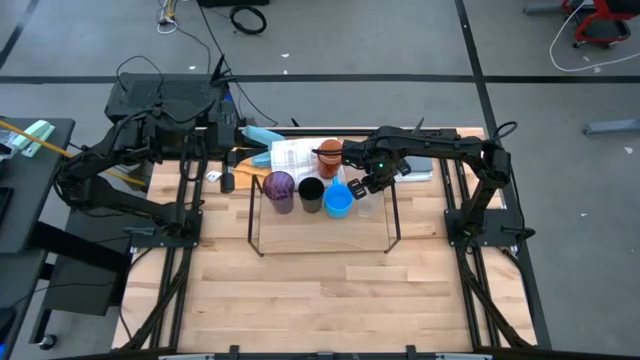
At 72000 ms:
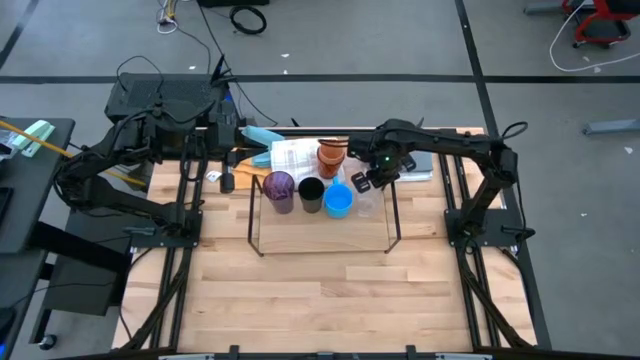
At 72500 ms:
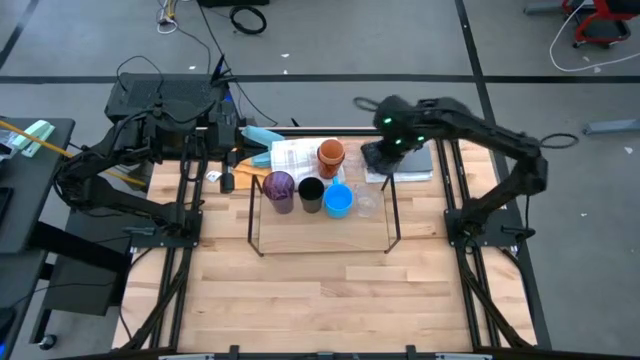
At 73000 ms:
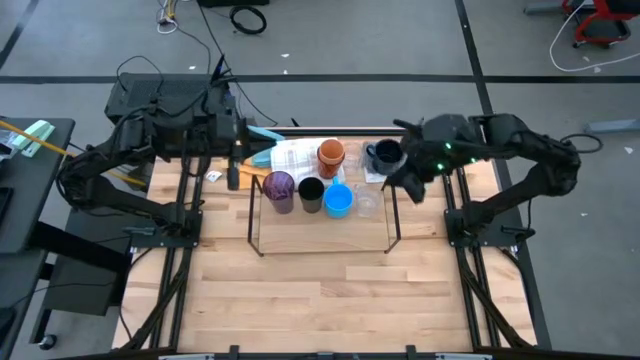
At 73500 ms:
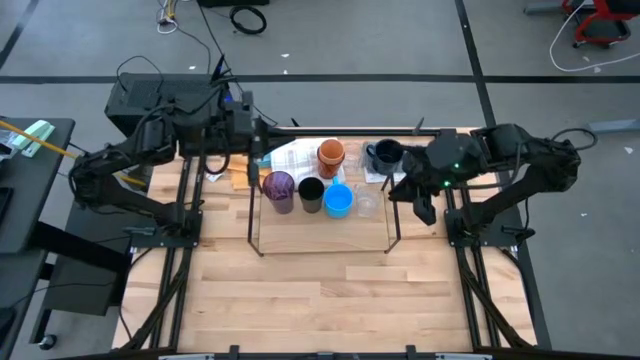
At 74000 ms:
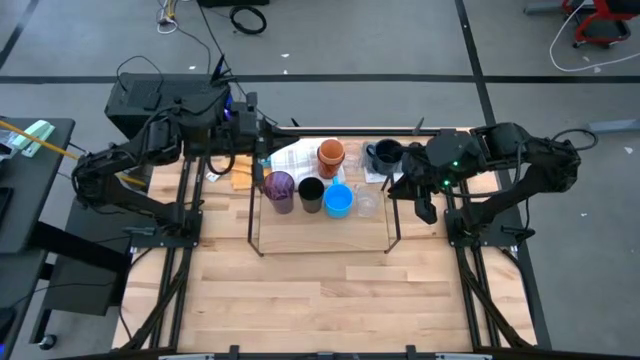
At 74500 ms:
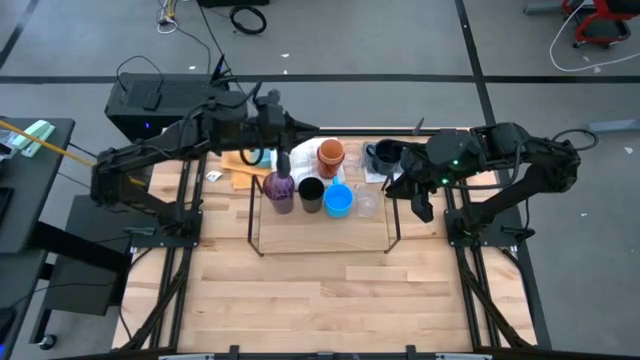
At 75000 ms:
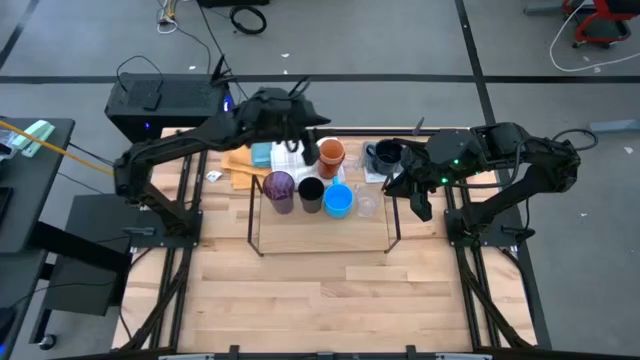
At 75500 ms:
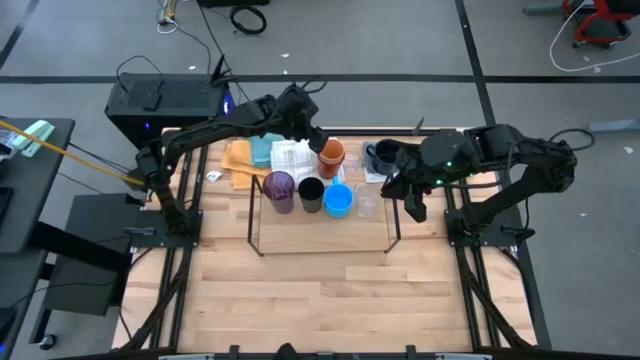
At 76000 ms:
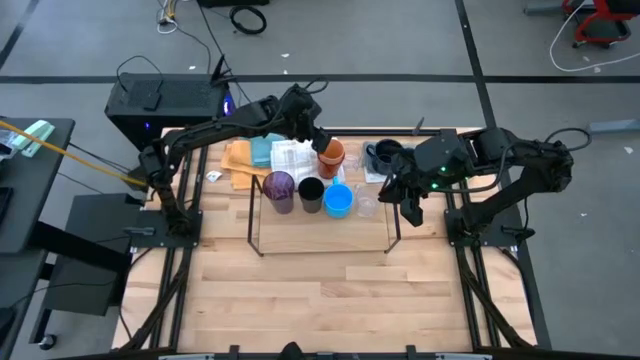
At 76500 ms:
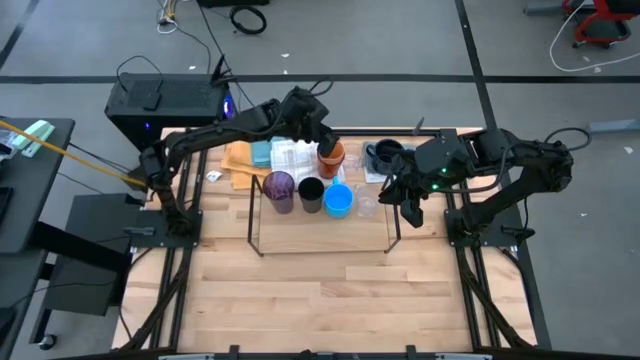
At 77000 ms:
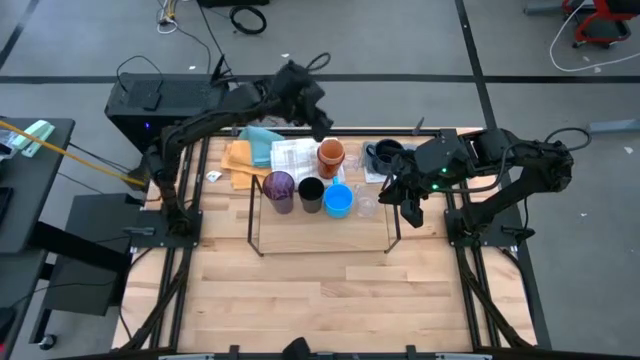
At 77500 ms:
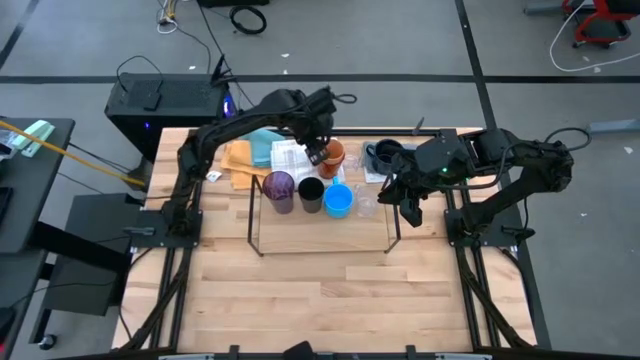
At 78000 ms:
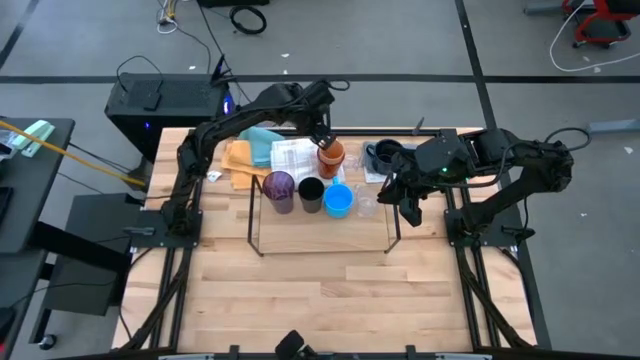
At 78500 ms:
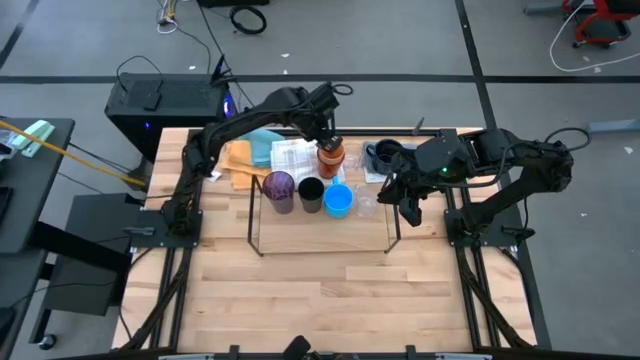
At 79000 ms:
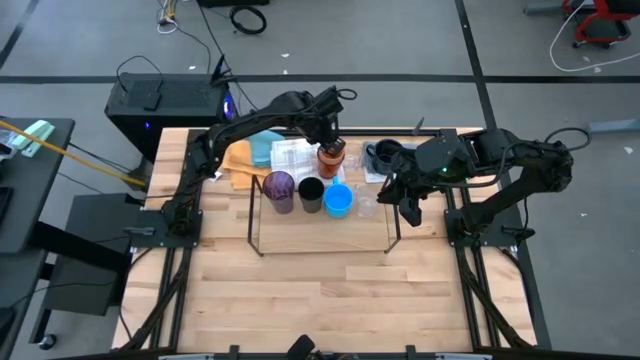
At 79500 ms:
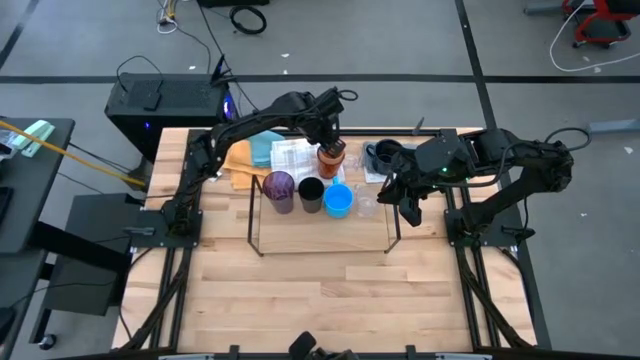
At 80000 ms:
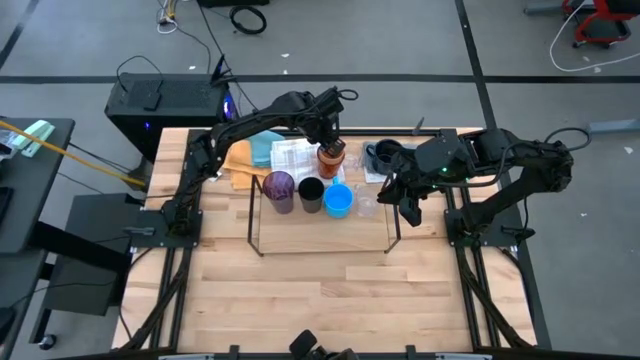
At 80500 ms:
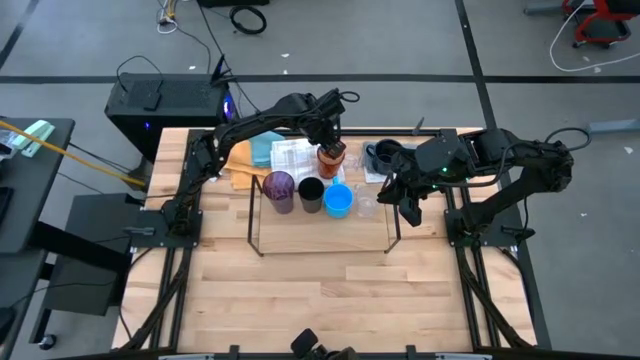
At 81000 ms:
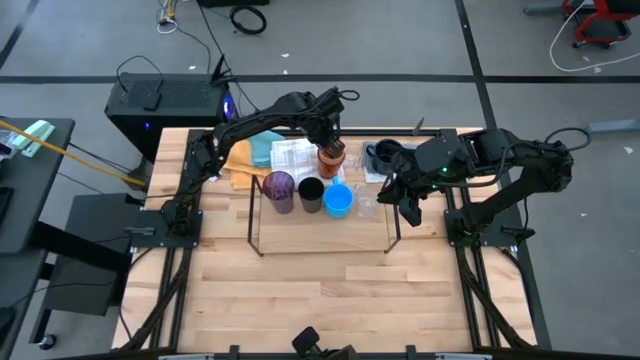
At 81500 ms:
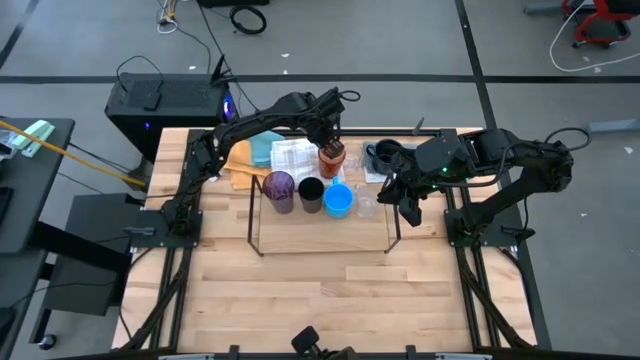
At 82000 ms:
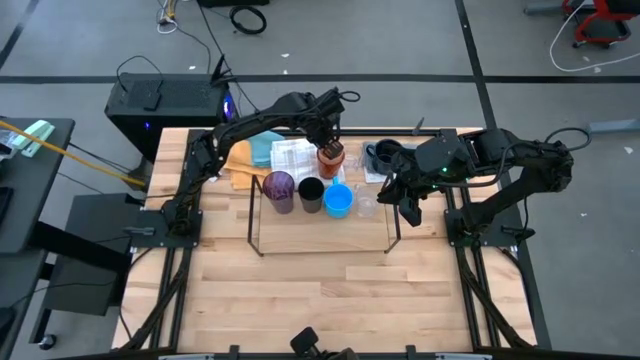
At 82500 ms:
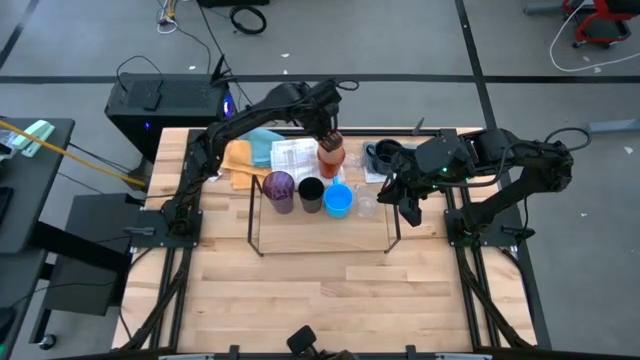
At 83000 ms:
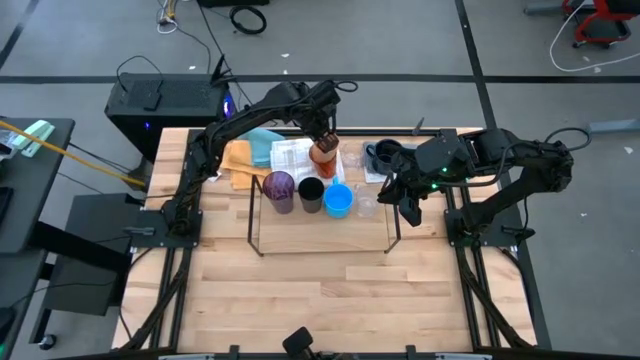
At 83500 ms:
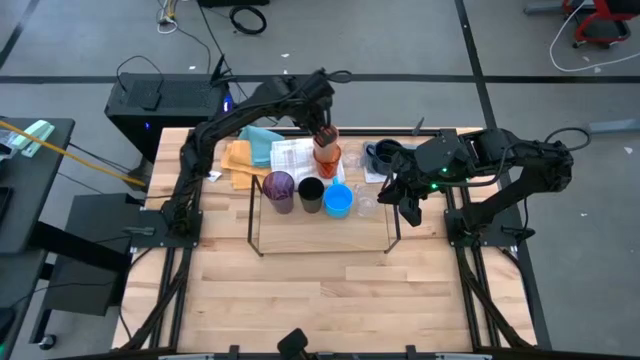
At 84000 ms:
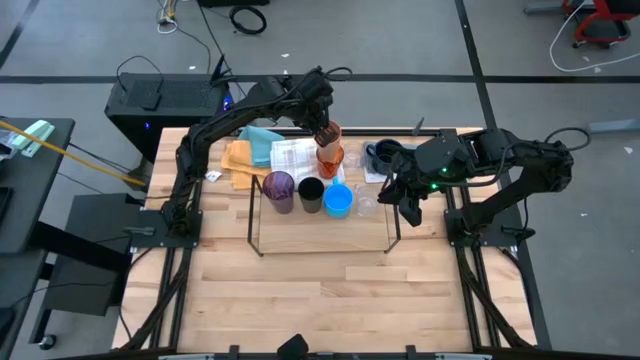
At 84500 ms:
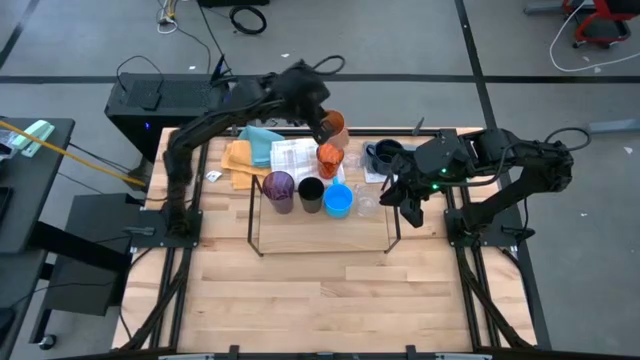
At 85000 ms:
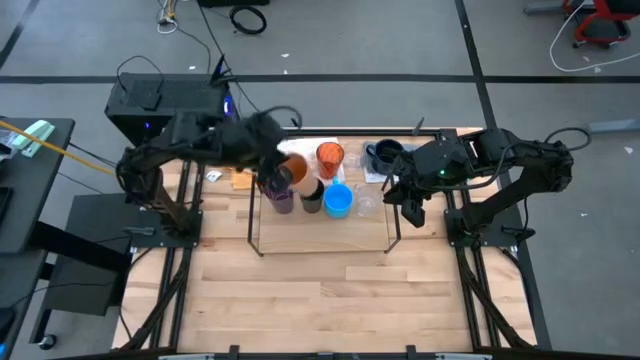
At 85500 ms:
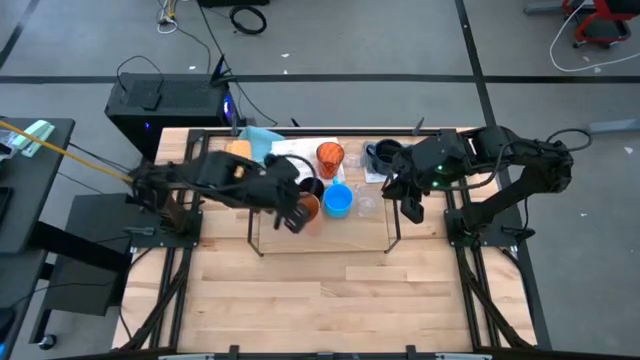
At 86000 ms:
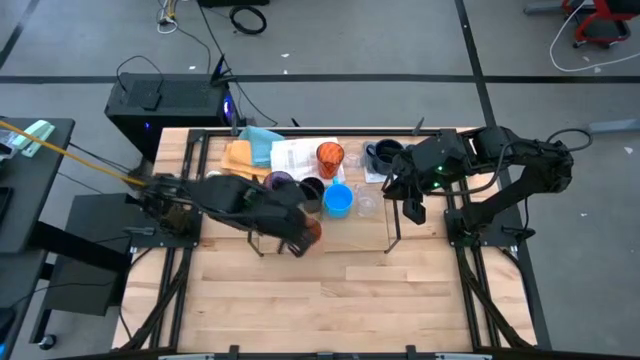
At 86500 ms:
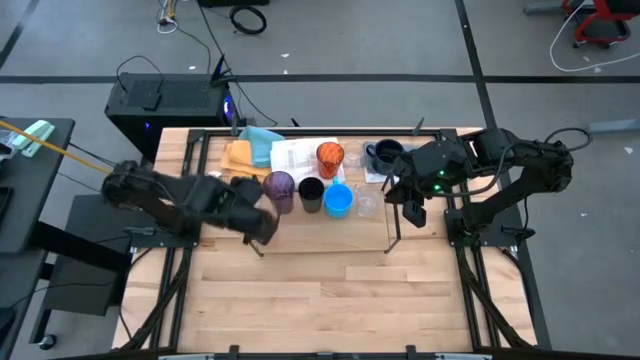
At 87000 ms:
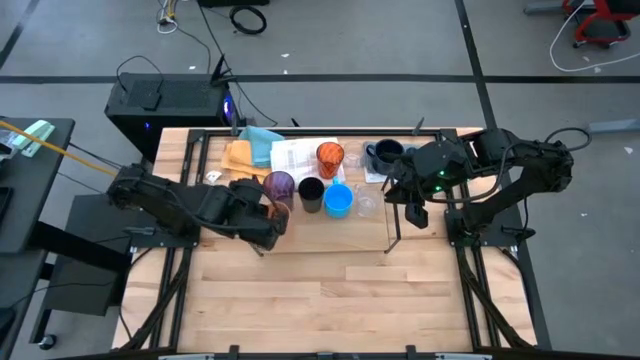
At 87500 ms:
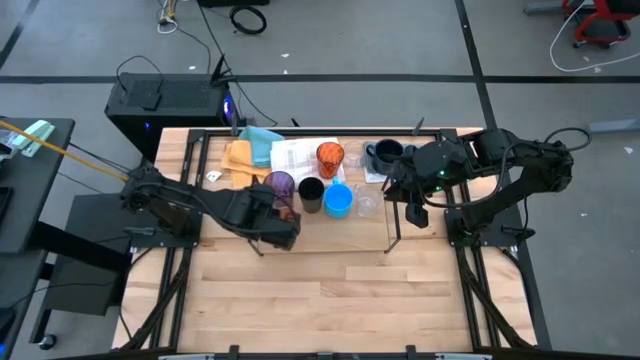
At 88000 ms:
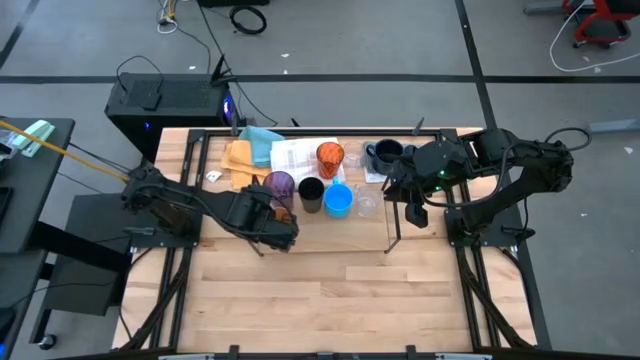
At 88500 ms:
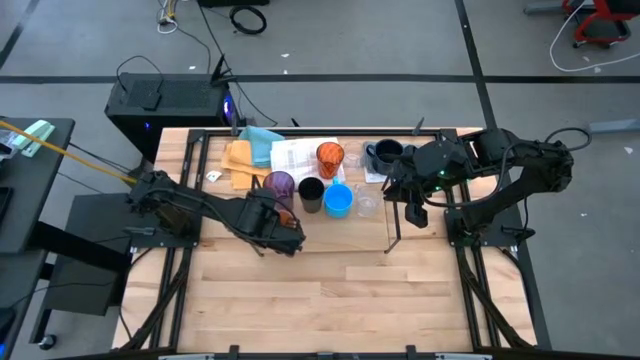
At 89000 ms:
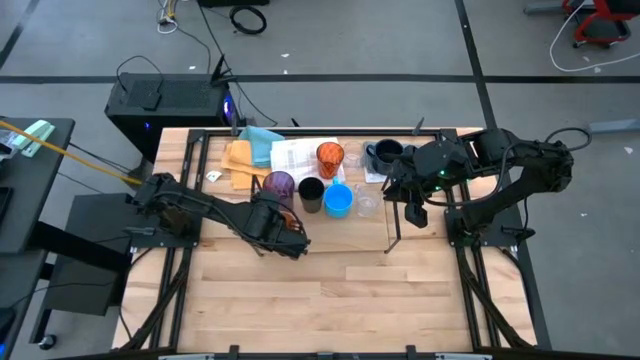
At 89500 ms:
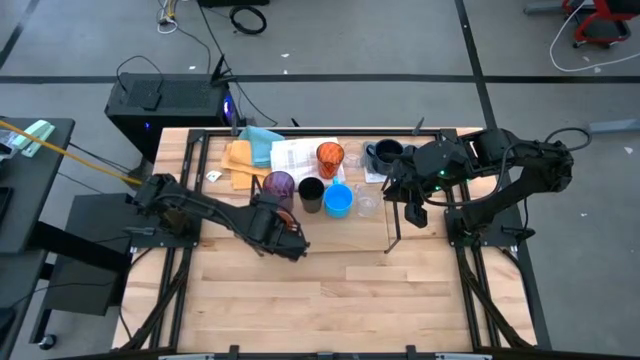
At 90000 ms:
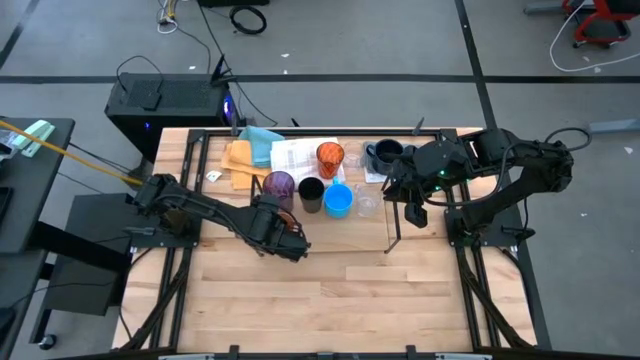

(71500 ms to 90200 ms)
Task: Stack small to large cups/mugs on shelf
Put the orange cup on the shelf

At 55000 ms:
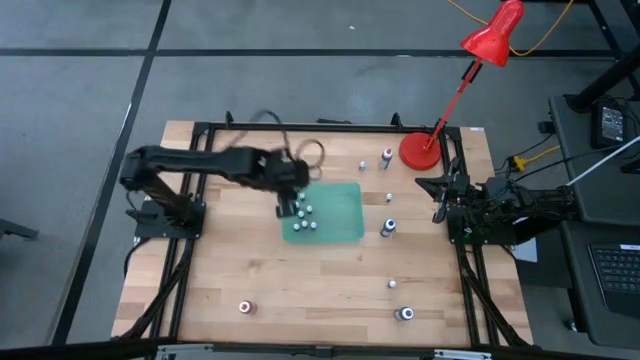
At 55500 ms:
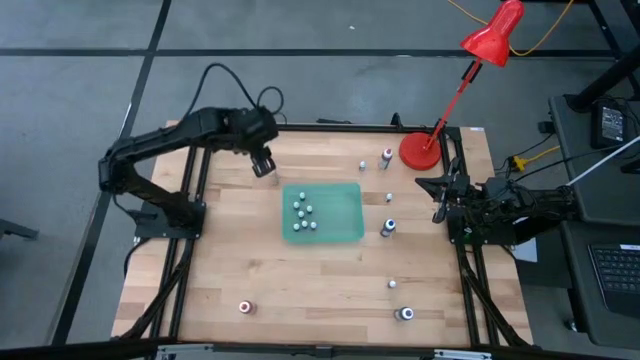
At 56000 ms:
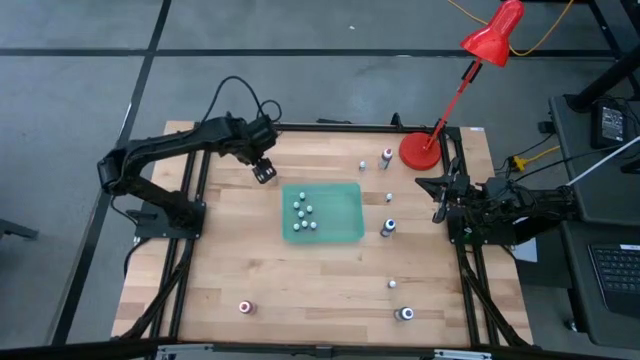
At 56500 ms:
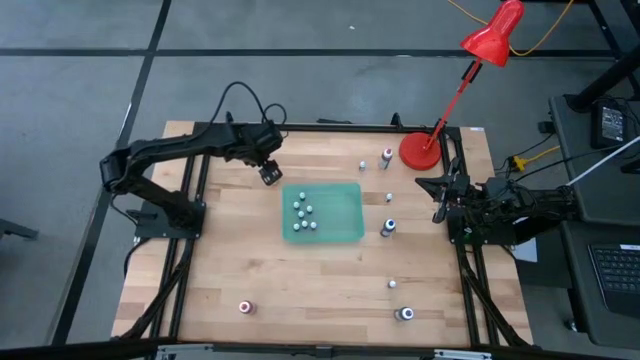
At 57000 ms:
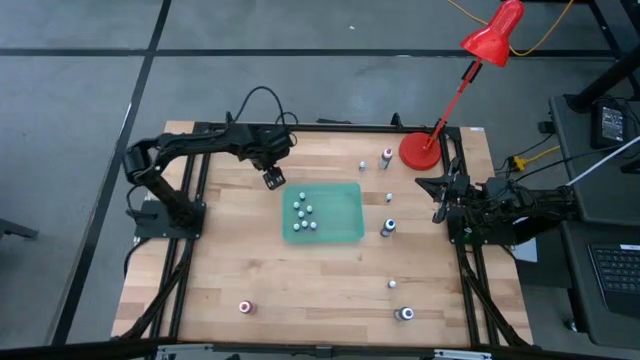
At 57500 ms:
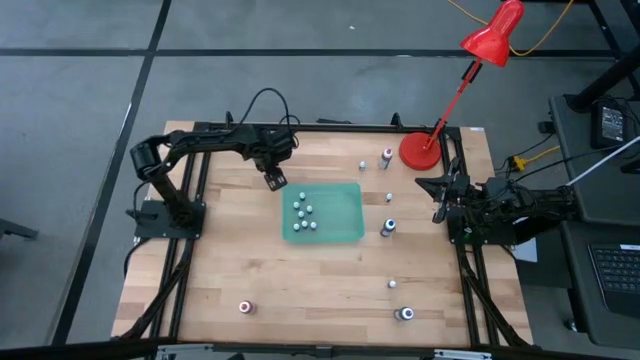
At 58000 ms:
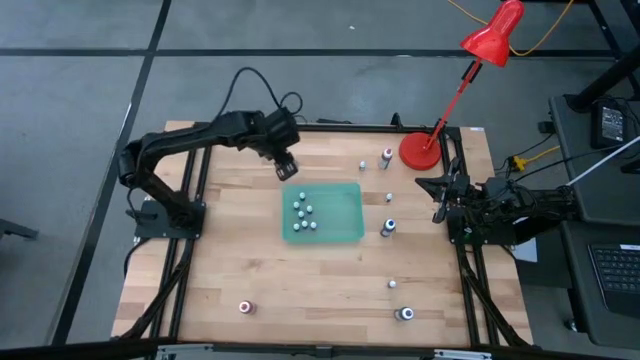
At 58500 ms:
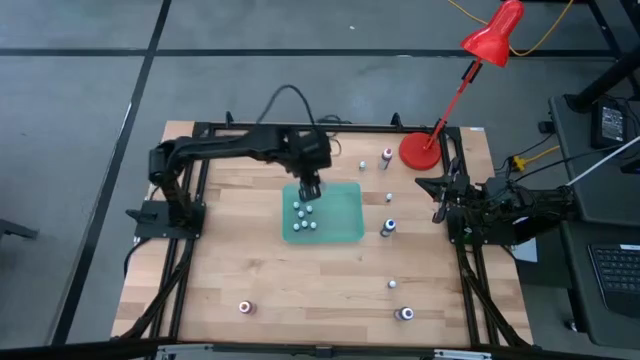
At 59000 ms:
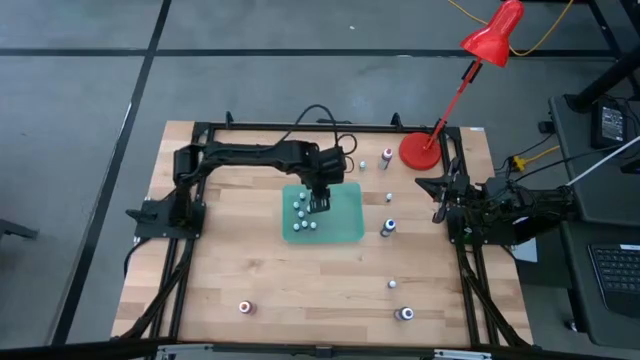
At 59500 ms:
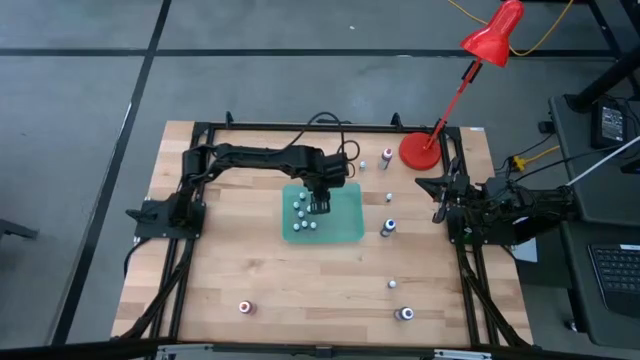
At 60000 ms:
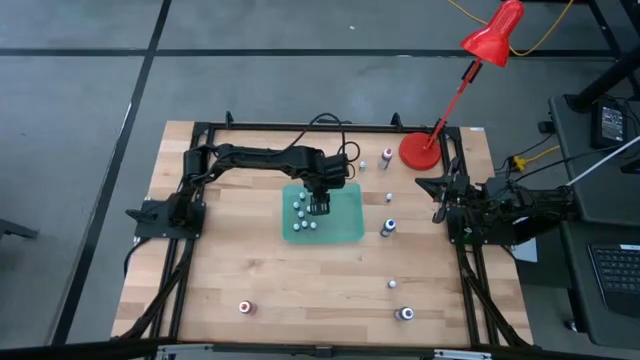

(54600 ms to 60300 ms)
Task: Pick & Place food coloring
Put the big yellow food coloring bottle into the green bin
